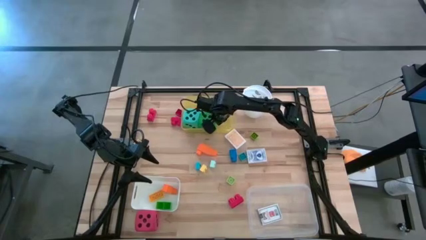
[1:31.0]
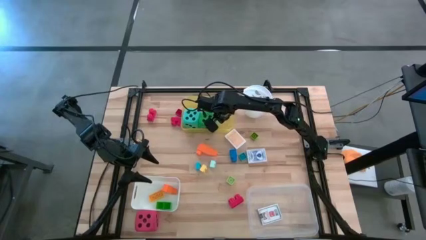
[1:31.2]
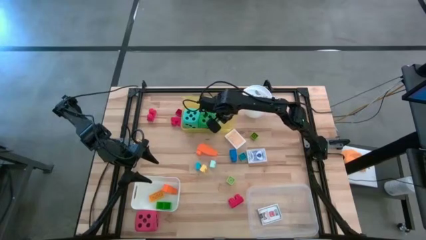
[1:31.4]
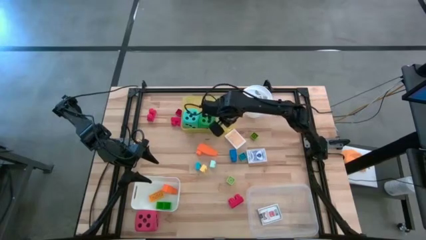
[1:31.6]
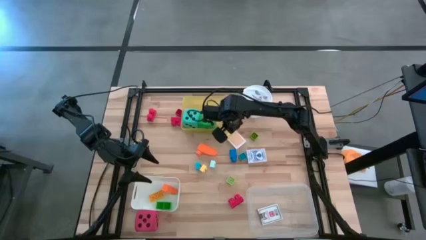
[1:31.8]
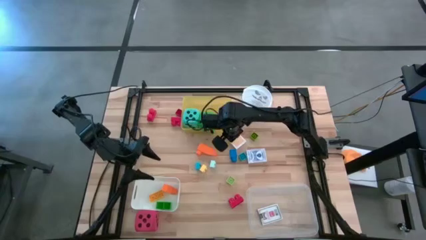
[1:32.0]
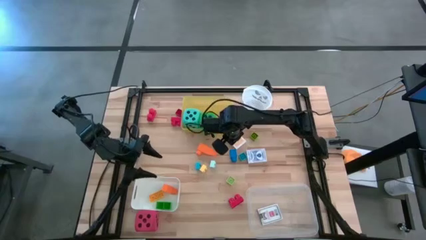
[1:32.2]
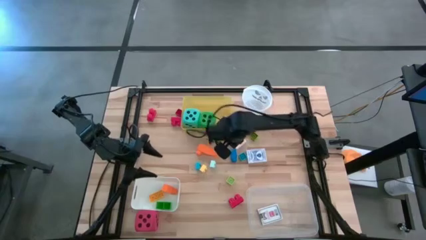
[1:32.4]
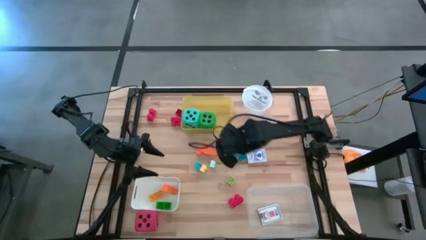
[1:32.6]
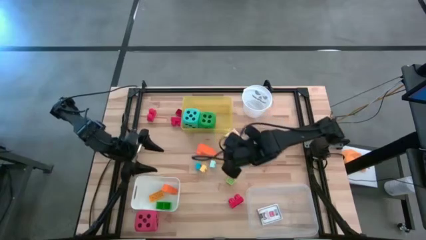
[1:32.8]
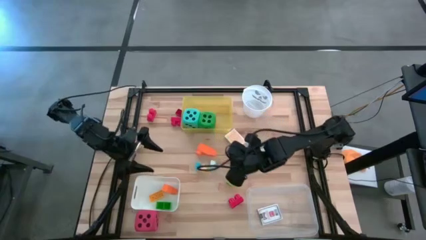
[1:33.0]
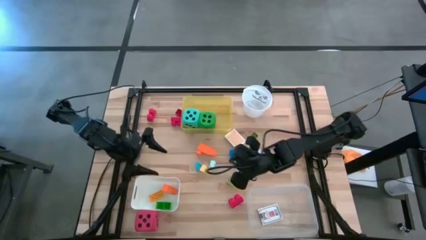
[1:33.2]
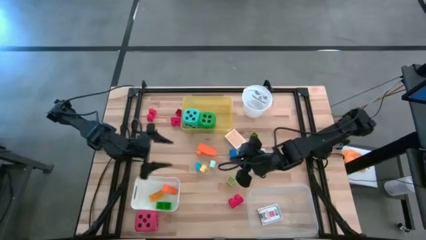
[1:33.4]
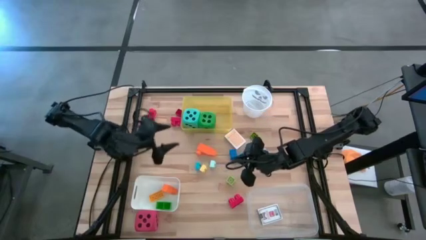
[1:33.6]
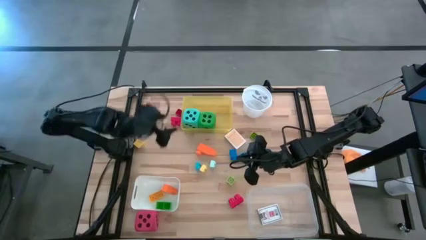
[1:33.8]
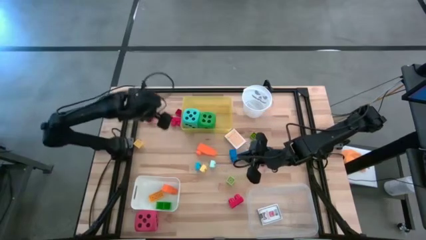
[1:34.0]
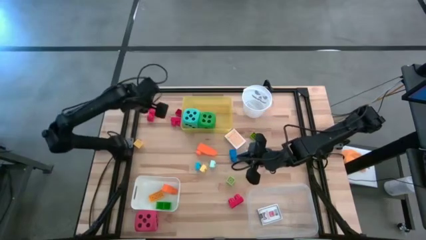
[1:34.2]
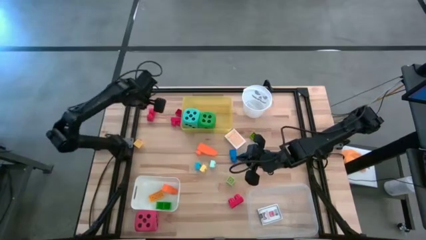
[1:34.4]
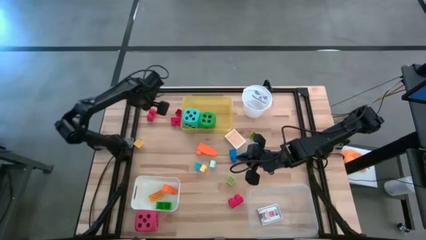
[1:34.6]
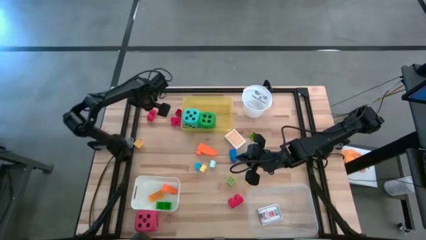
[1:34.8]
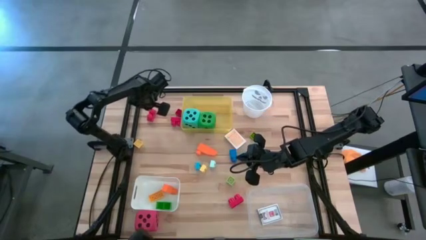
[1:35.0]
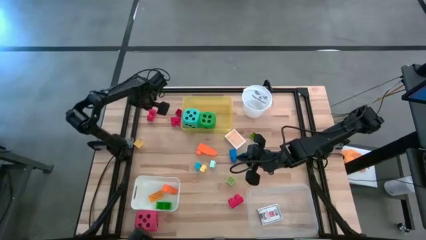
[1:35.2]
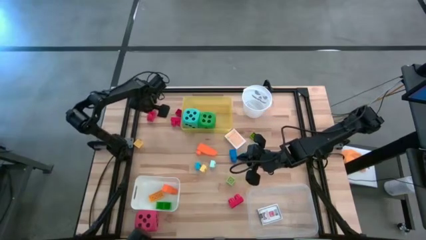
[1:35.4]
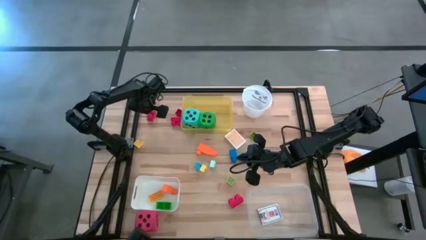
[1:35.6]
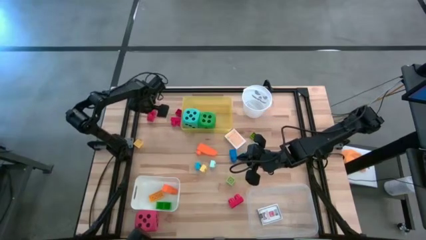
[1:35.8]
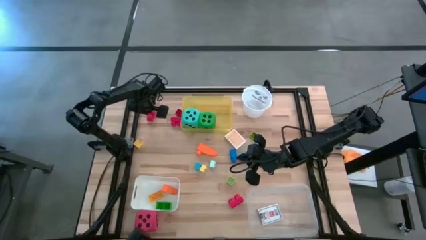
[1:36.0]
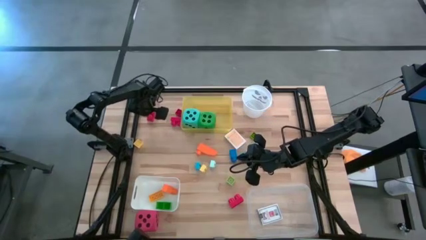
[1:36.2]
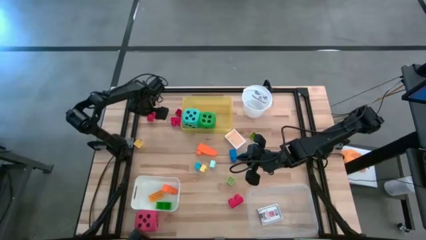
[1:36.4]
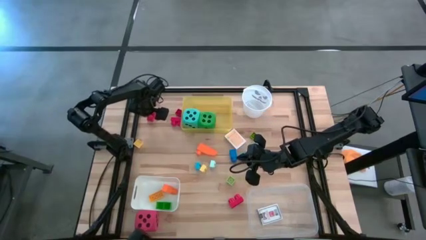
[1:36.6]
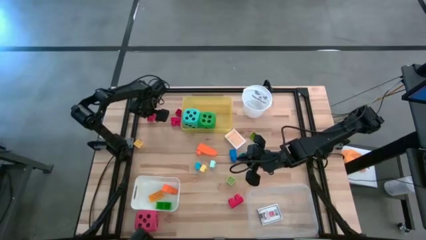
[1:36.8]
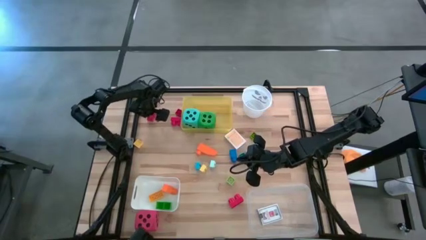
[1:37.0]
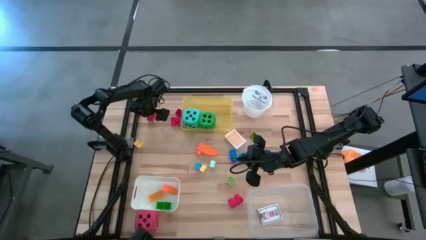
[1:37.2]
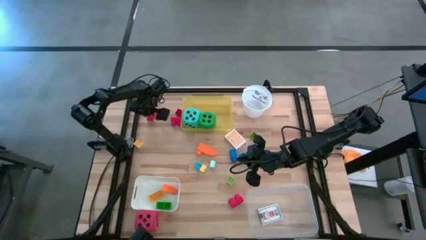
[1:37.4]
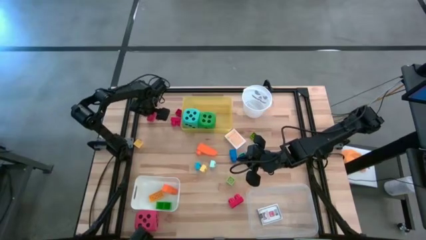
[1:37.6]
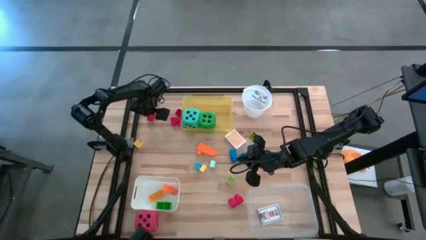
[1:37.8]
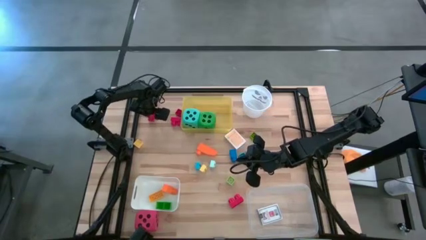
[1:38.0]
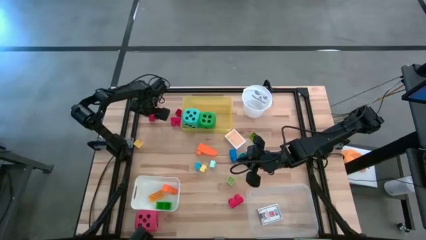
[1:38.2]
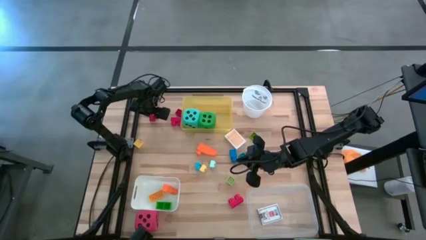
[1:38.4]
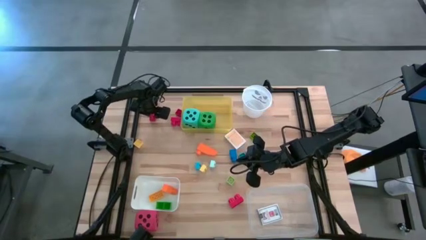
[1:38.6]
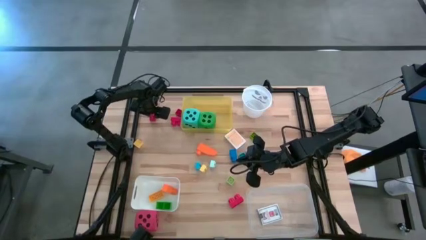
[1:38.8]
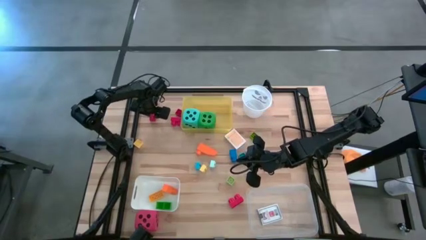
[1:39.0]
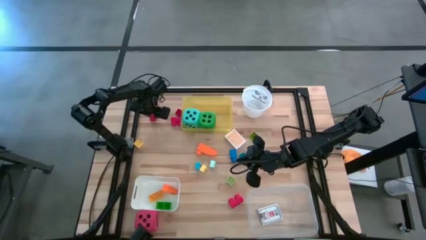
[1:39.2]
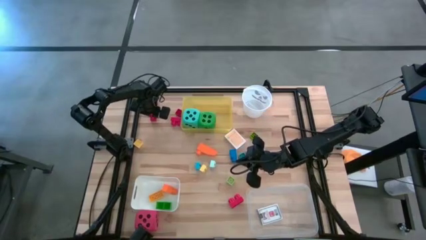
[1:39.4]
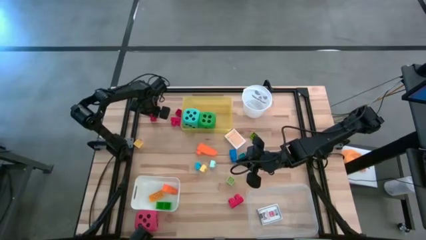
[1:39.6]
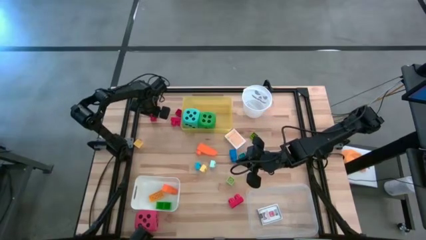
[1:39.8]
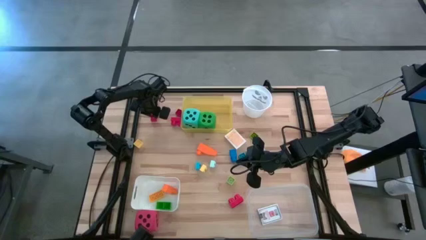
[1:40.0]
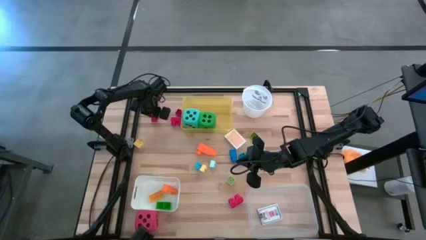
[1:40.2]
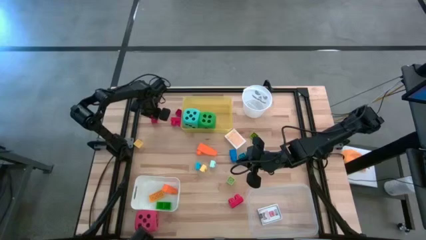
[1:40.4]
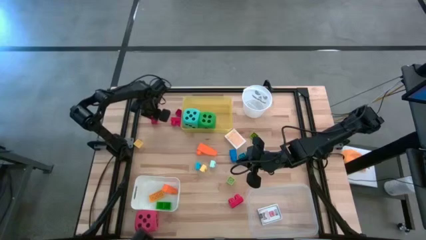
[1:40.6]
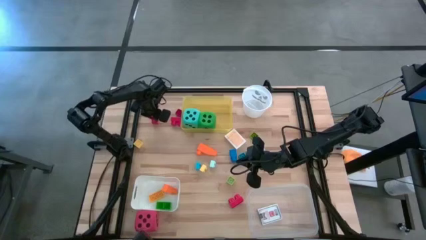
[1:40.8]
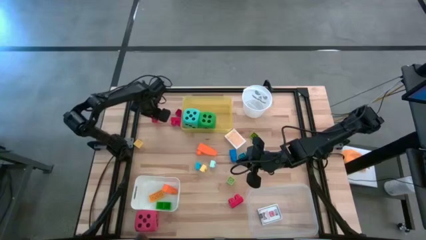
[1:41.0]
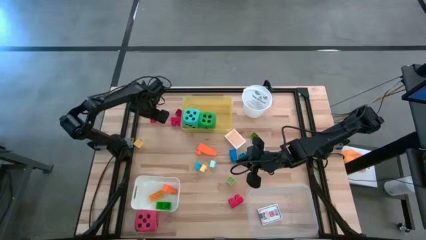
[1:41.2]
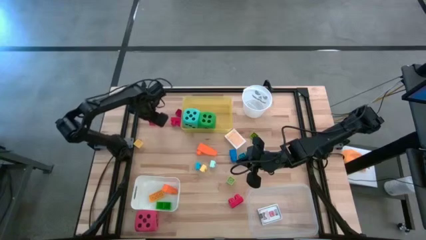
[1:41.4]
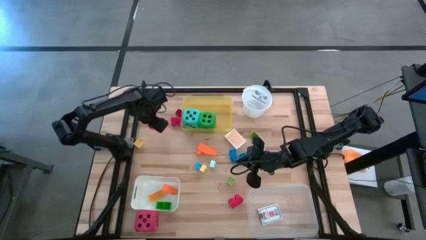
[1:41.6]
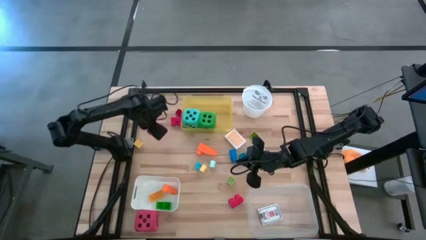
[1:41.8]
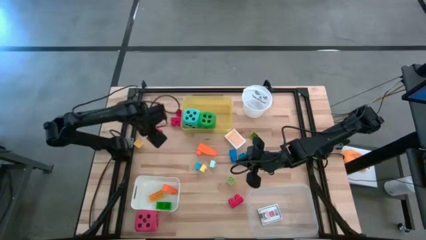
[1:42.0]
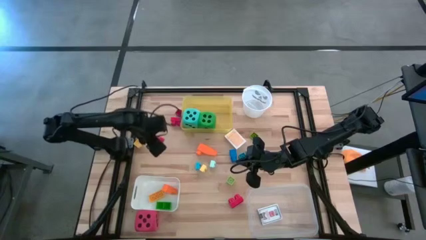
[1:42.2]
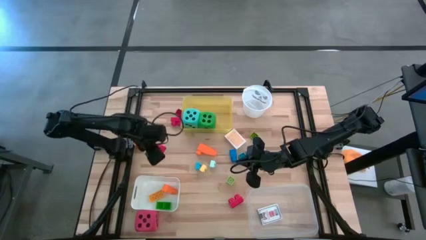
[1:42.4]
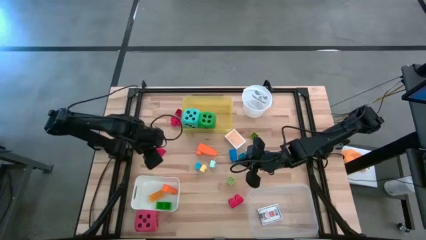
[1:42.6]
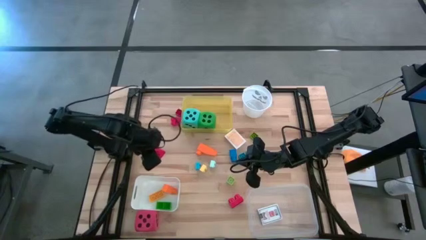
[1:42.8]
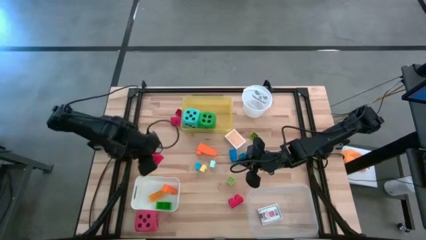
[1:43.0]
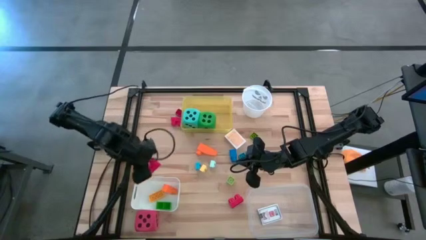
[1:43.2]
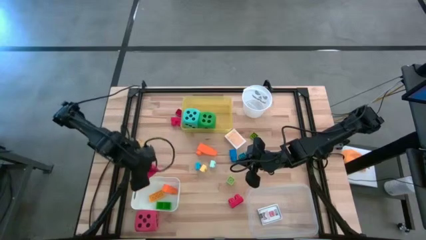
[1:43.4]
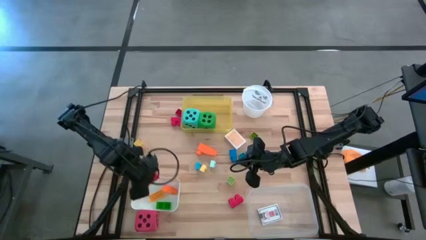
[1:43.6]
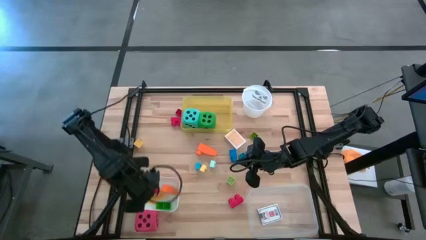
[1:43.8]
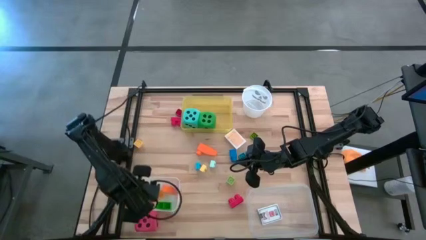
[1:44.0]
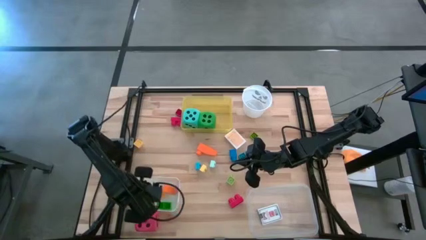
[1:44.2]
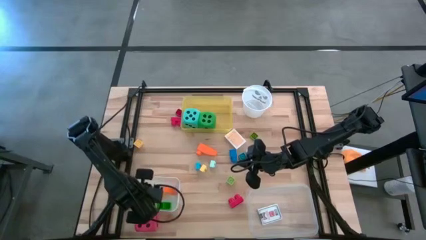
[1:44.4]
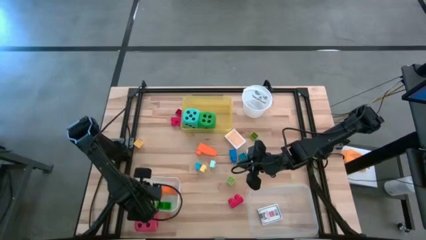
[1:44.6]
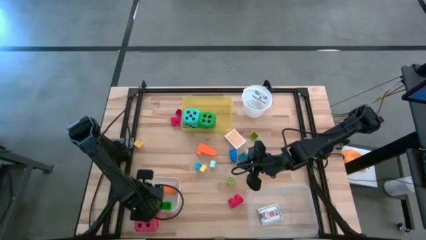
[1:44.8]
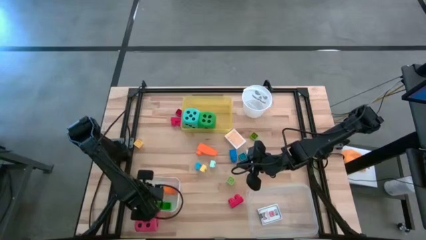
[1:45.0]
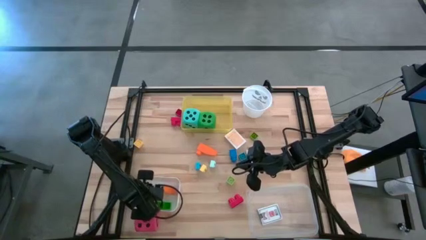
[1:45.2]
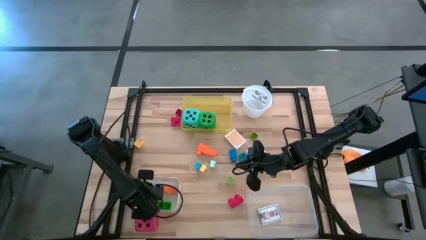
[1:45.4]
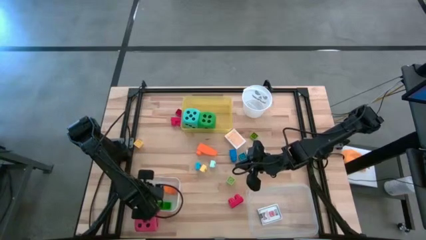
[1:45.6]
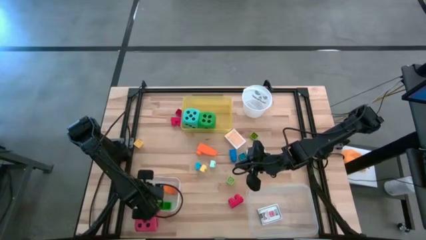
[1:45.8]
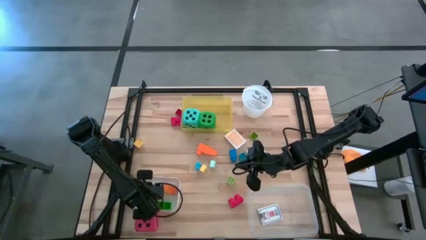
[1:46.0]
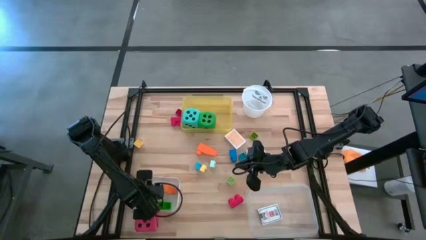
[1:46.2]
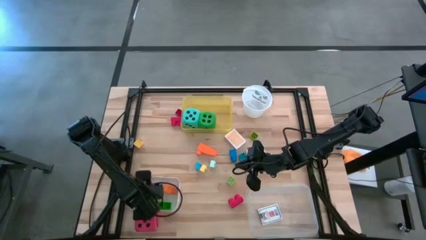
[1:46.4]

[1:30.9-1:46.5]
Task: Pick & Place Toys
Put the top left red game piece into the white bin
